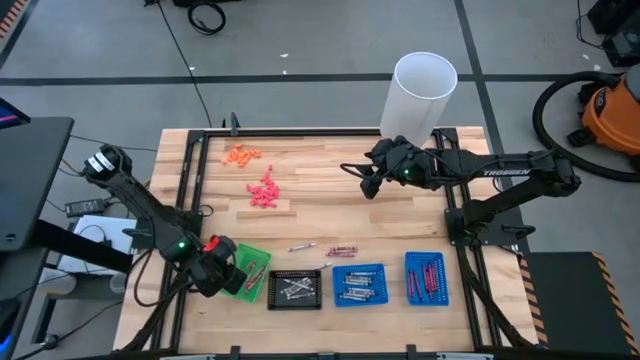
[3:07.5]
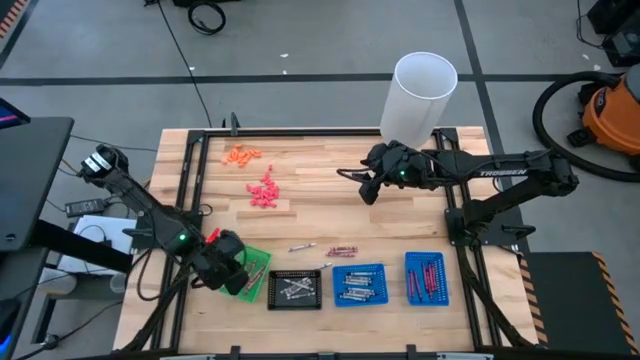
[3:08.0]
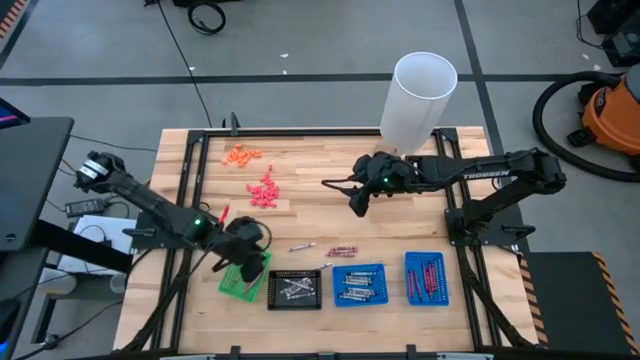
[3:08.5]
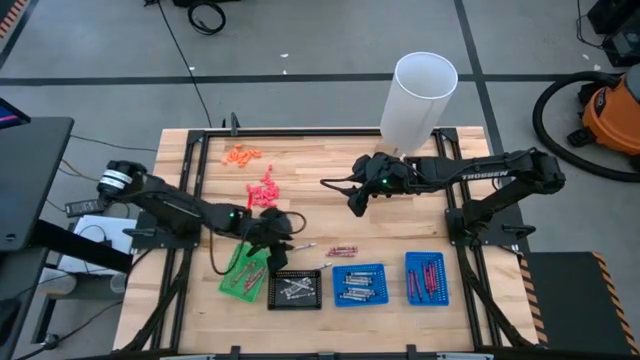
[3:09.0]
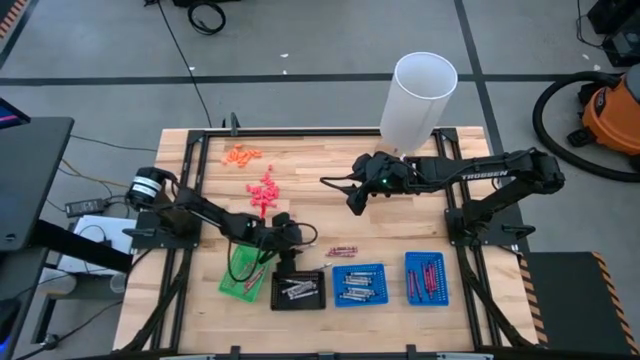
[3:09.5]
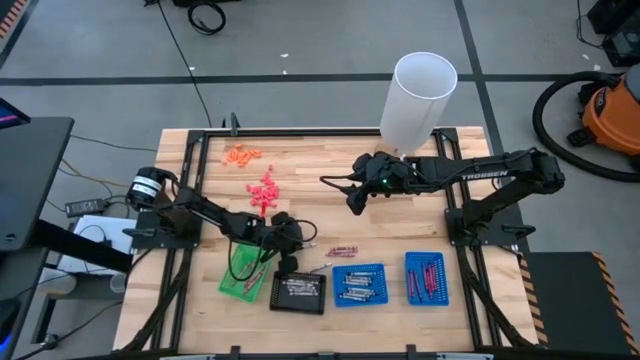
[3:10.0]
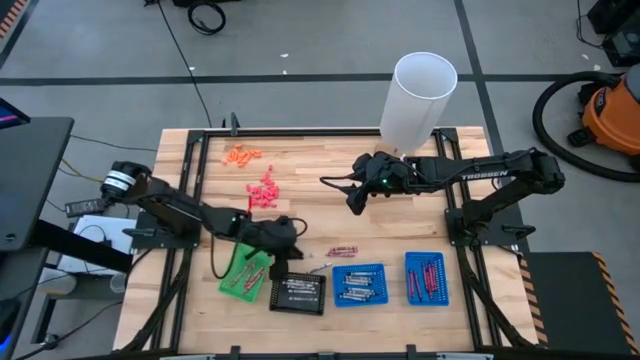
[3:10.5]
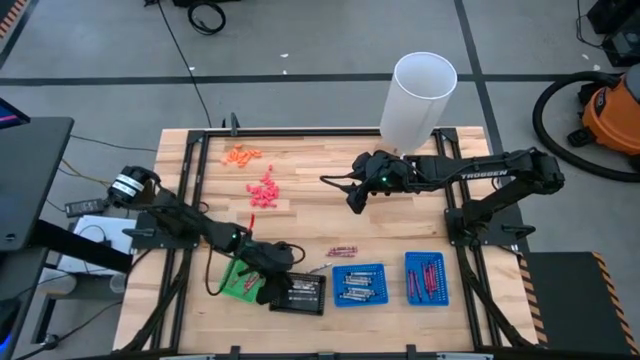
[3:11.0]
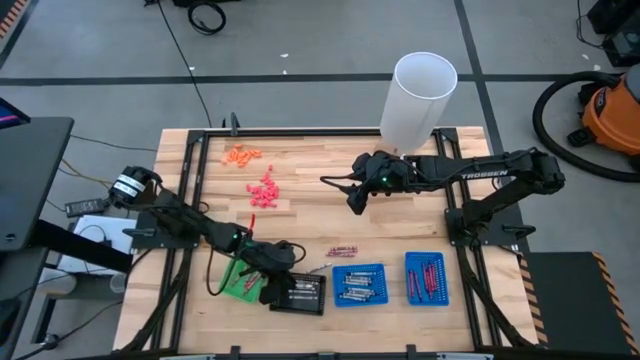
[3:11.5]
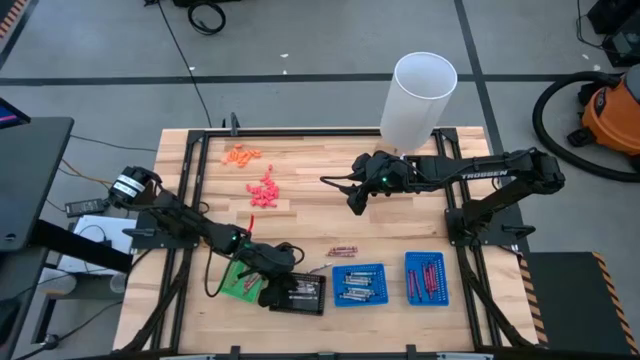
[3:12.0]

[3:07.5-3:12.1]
Task: Sort crayons
Put white crayon into the back basket

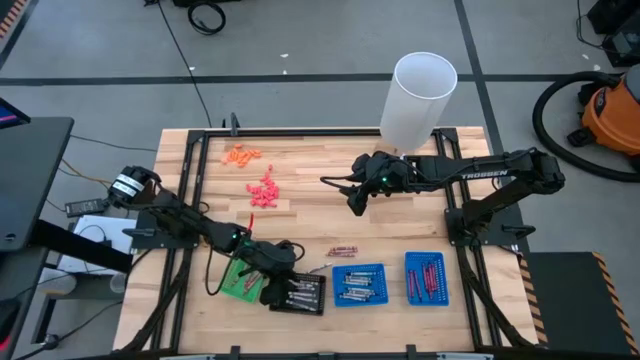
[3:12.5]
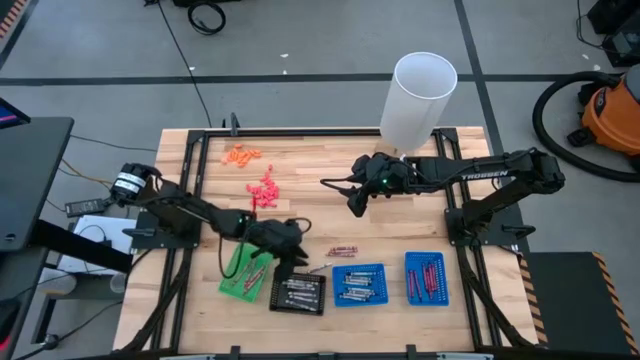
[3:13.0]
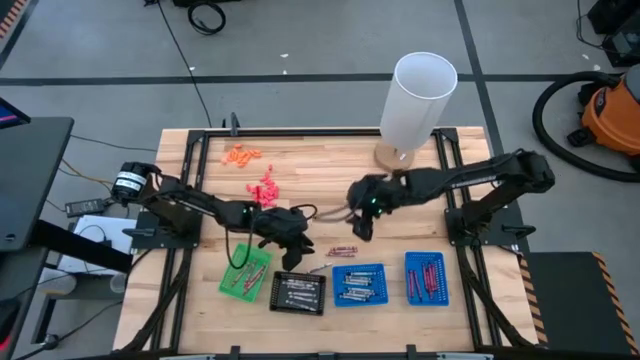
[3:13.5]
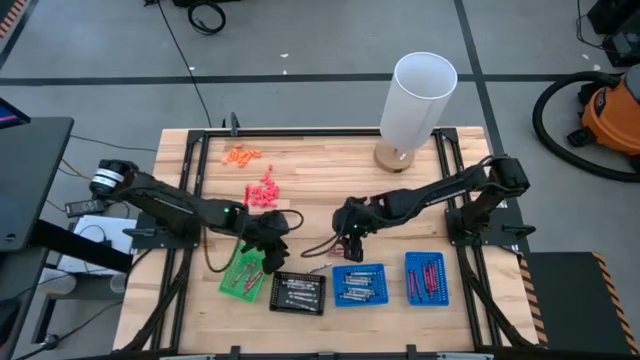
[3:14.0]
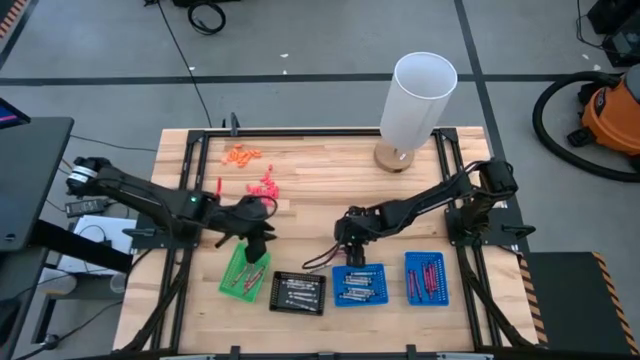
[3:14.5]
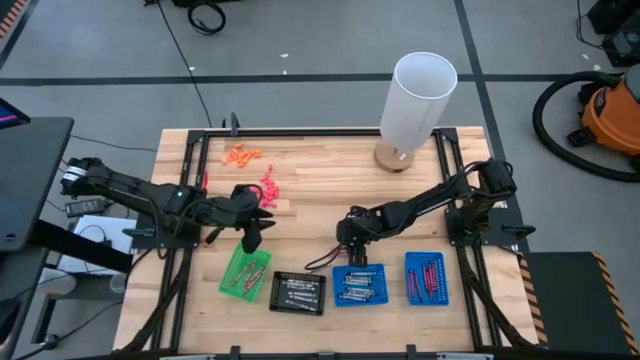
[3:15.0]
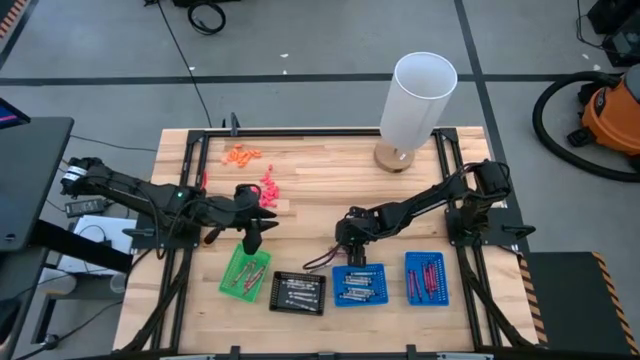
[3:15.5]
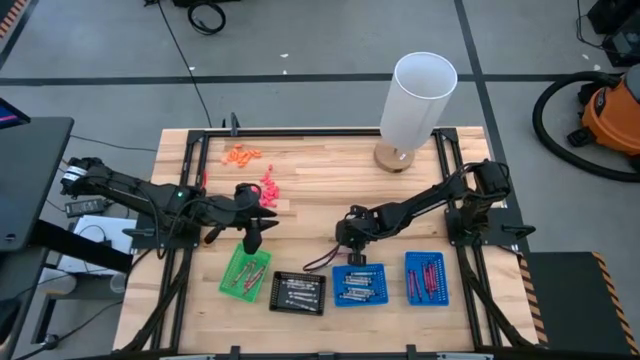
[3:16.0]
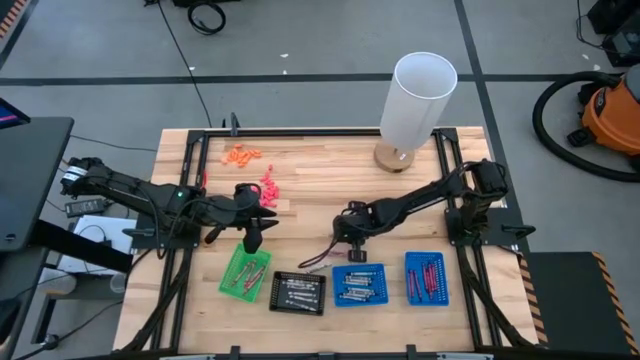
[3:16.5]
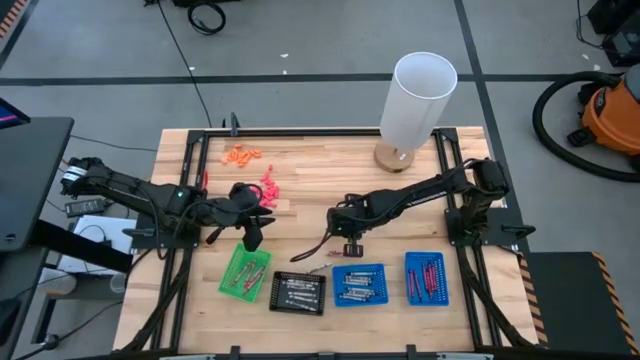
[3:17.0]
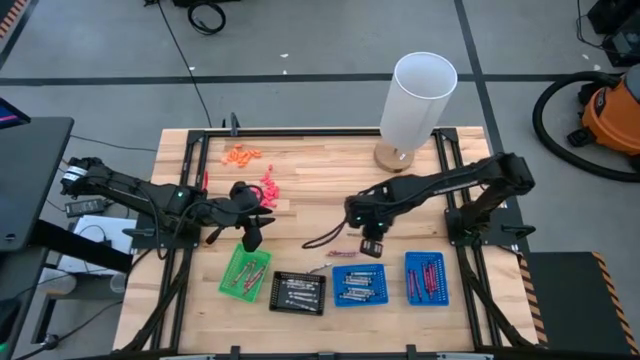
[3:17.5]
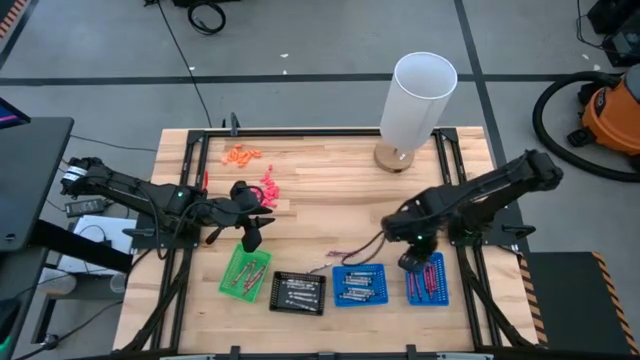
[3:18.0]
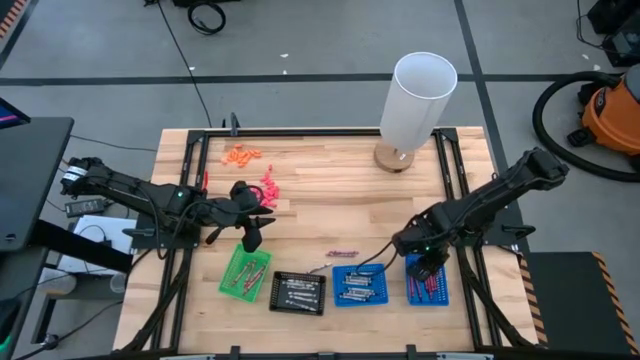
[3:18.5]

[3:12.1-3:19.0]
Put the pink crayon into the green basket

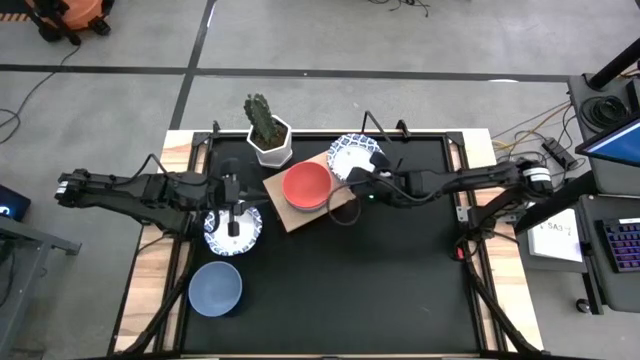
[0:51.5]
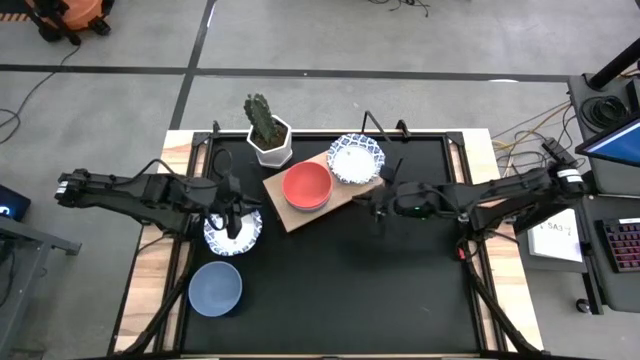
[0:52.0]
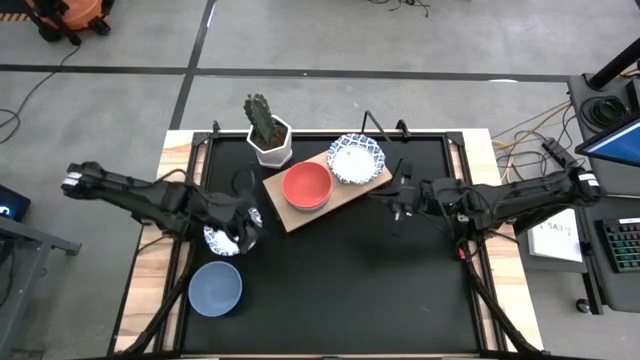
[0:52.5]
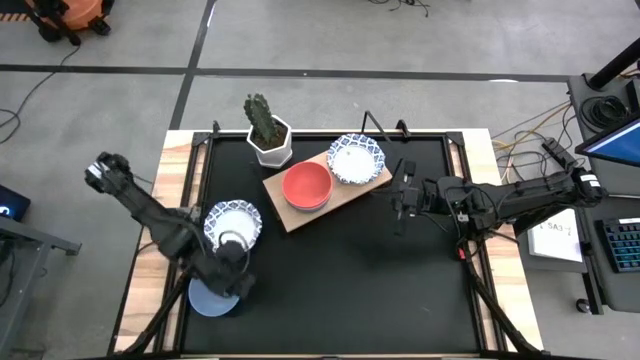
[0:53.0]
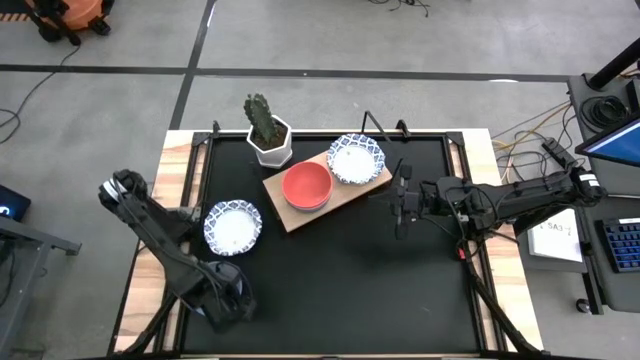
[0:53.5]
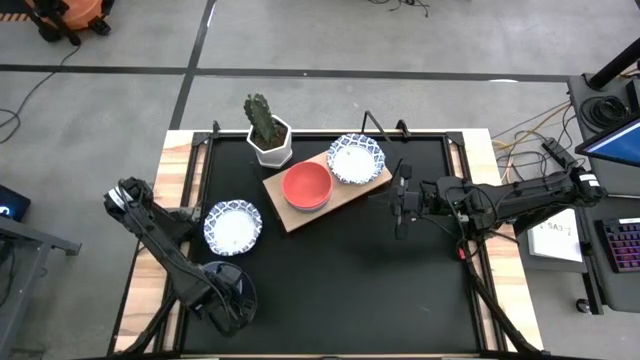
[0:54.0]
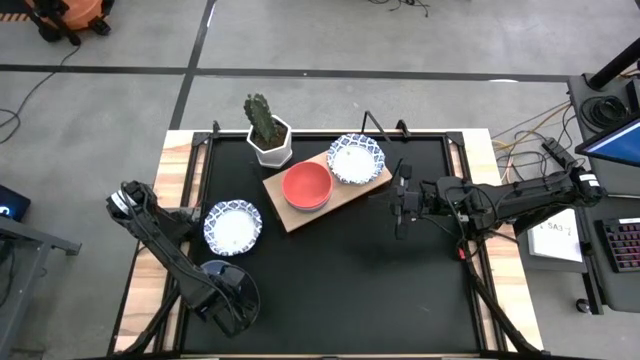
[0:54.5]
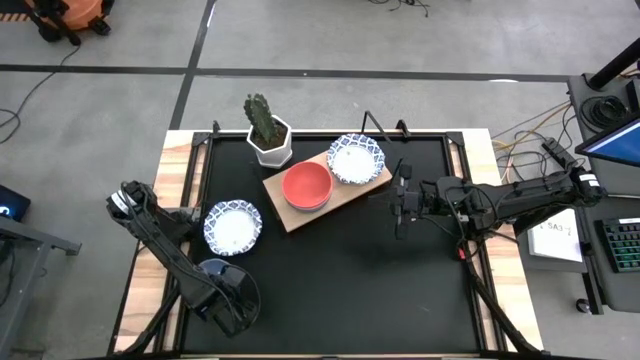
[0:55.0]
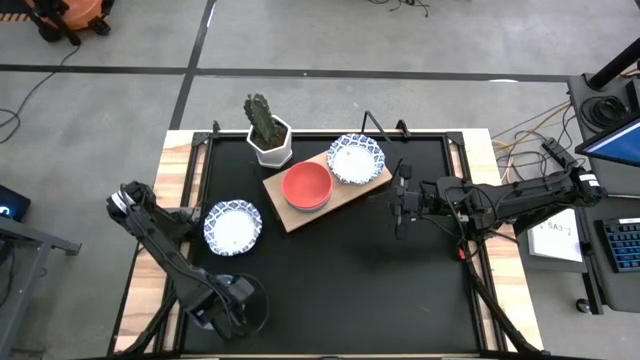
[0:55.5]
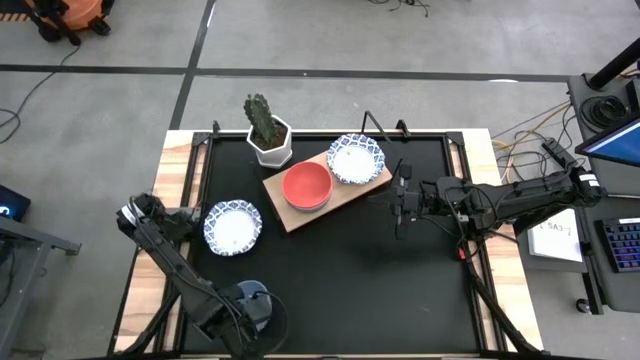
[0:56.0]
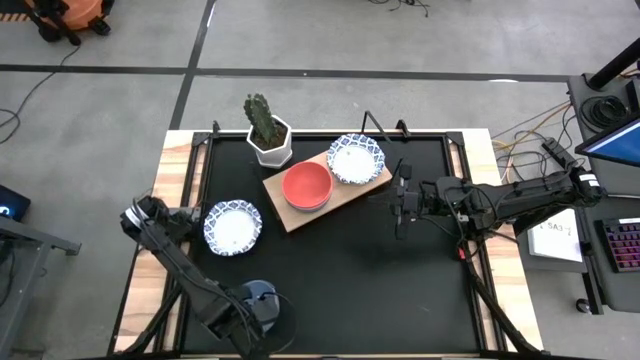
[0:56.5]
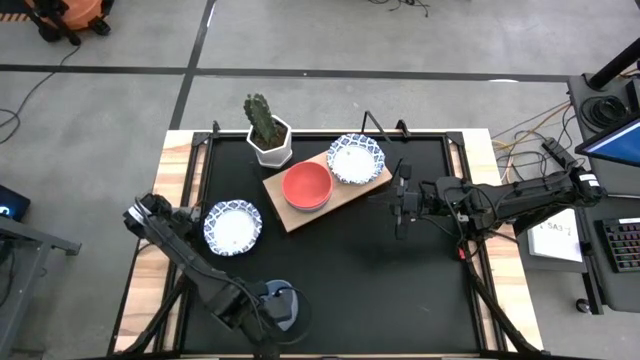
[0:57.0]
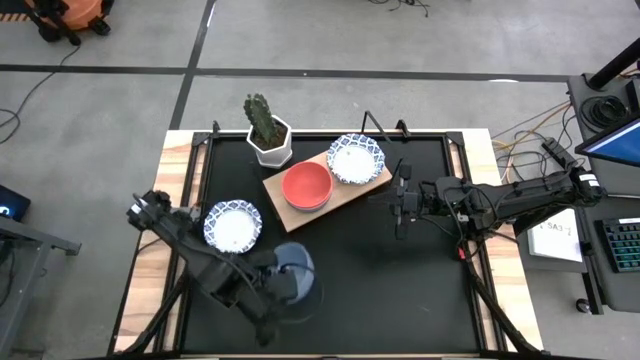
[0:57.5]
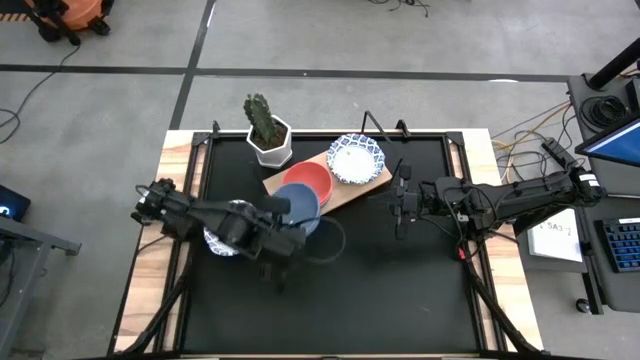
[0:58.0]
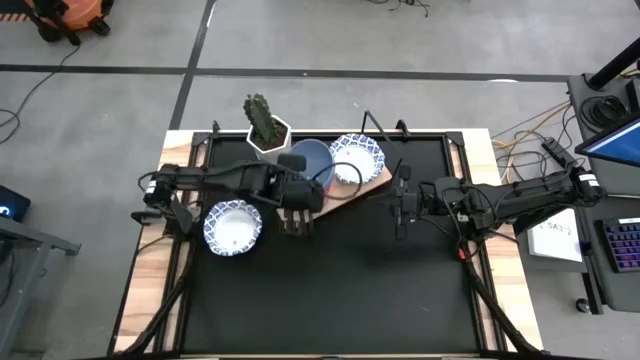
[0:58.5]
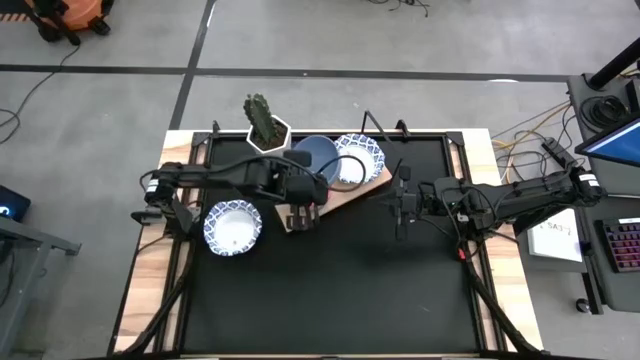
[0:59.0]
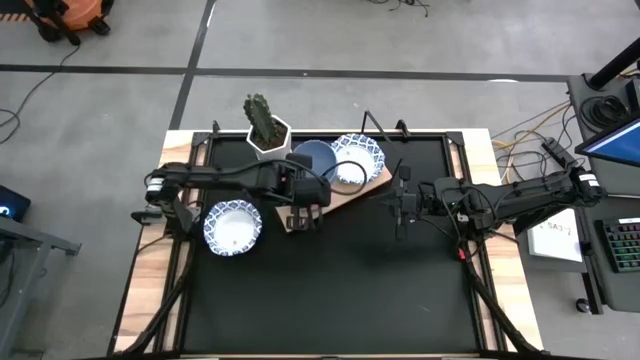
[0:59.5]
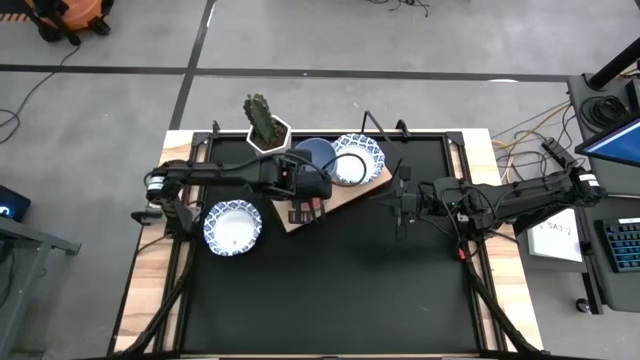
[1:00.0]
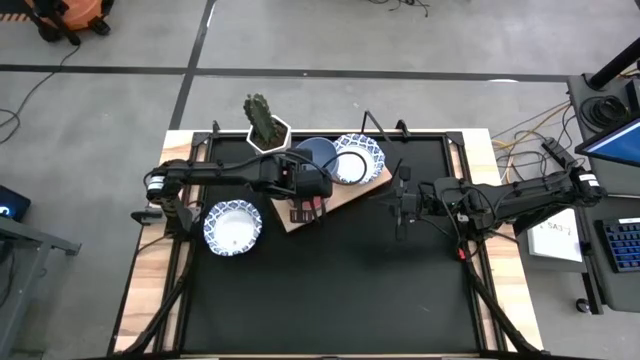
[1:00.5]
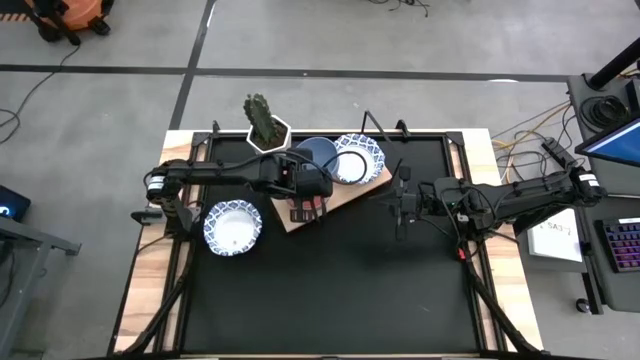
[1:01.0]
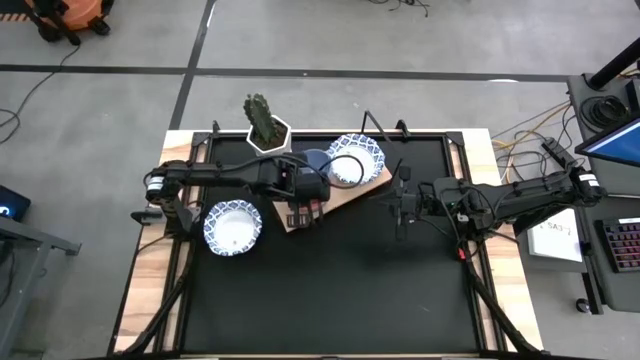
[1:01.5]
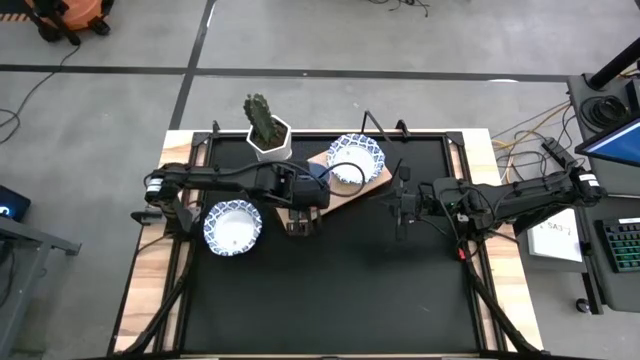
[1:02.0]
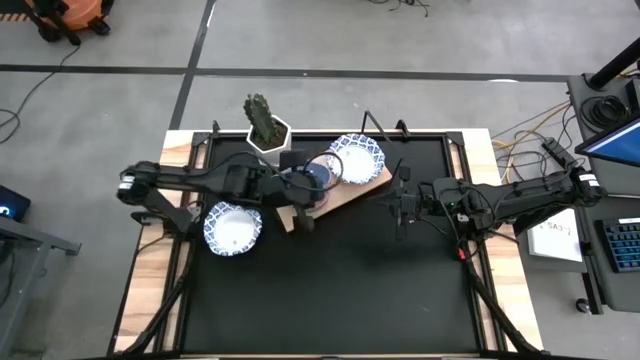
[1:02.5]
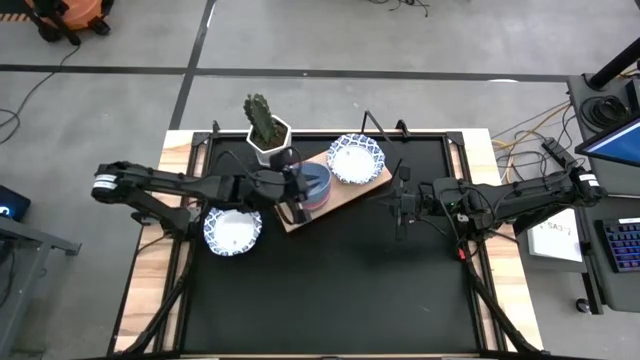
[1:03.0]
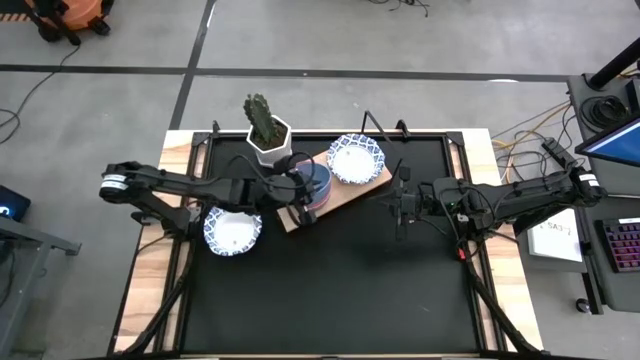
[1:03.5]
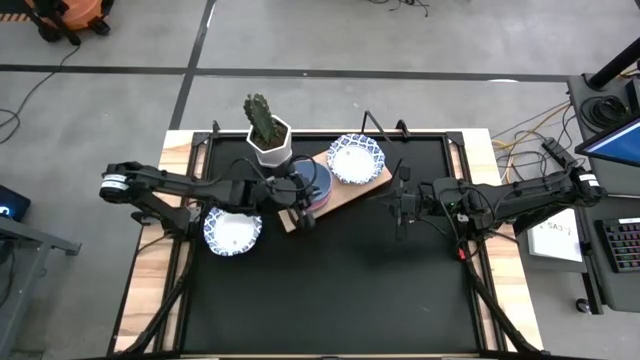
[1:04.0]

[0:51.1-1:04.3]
Task: Place and stack bowls onto a shelf
Stack the blue bowl on top of the orange bowl on the shelf
